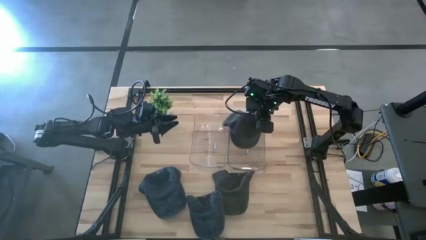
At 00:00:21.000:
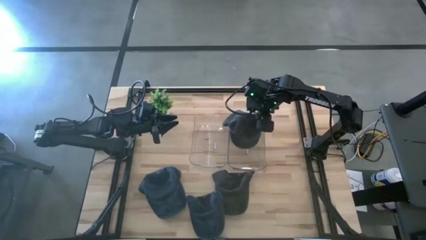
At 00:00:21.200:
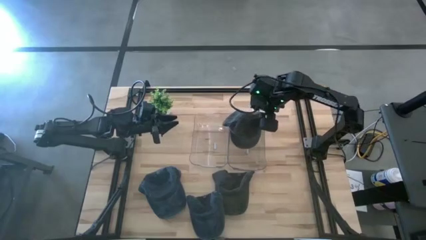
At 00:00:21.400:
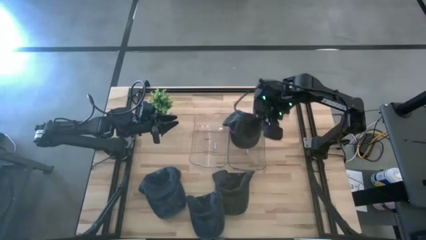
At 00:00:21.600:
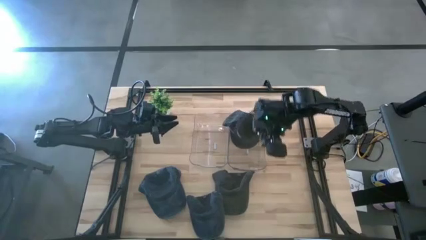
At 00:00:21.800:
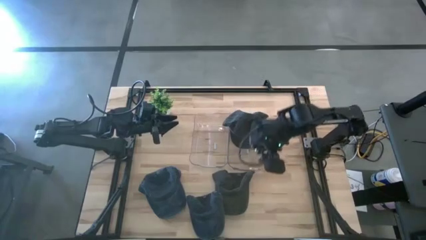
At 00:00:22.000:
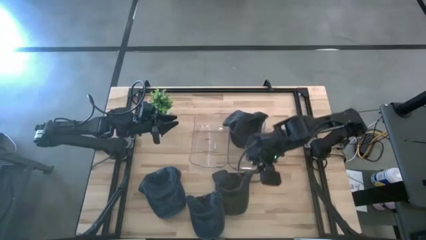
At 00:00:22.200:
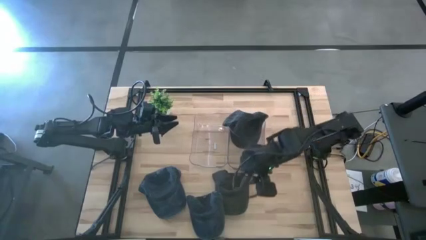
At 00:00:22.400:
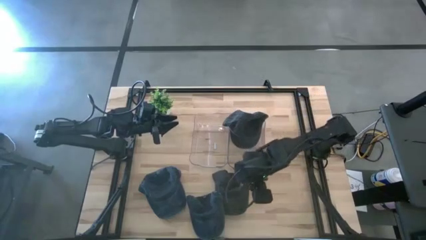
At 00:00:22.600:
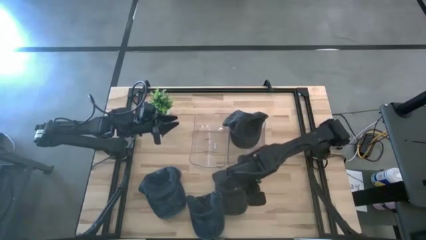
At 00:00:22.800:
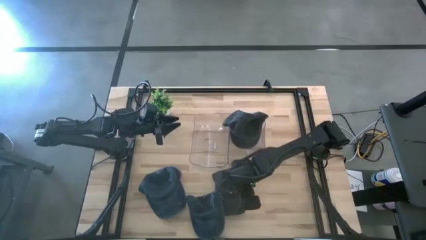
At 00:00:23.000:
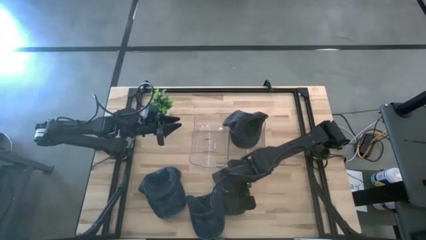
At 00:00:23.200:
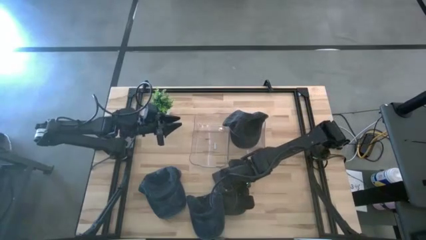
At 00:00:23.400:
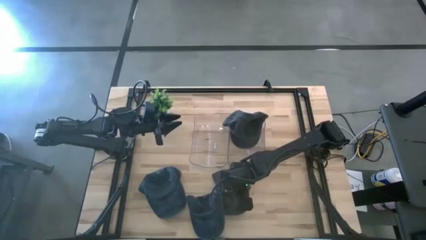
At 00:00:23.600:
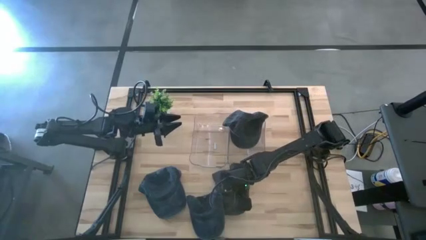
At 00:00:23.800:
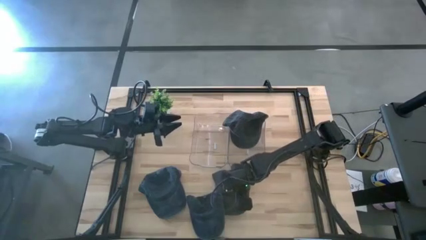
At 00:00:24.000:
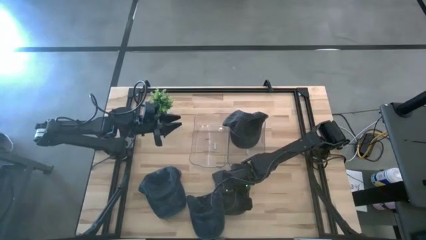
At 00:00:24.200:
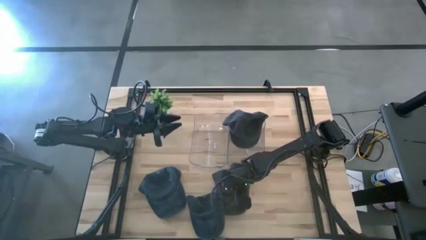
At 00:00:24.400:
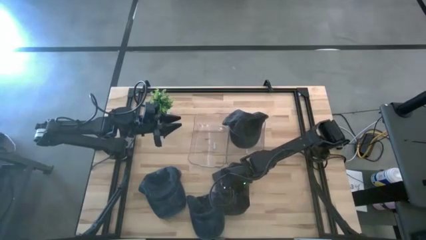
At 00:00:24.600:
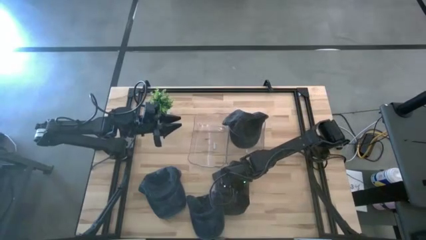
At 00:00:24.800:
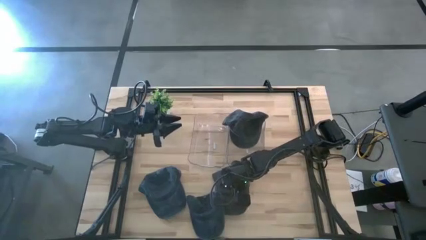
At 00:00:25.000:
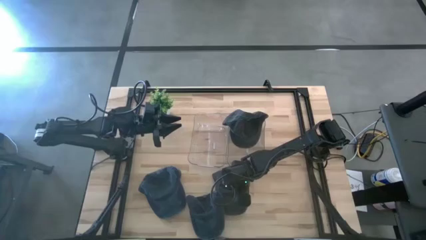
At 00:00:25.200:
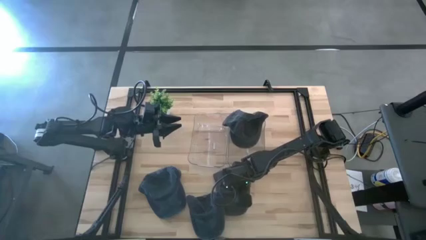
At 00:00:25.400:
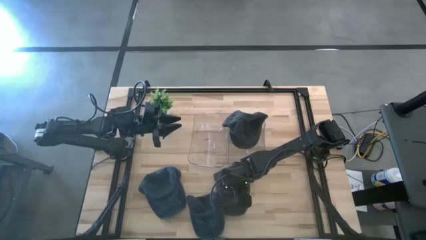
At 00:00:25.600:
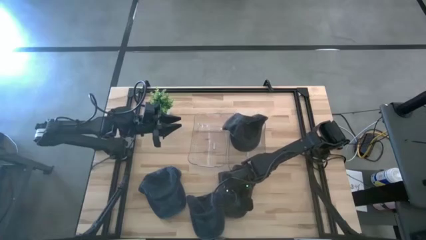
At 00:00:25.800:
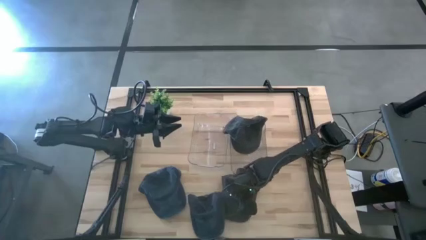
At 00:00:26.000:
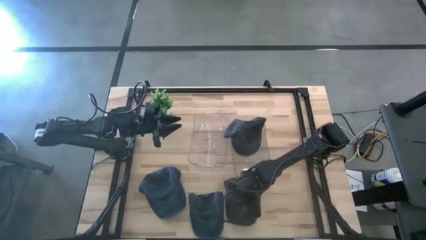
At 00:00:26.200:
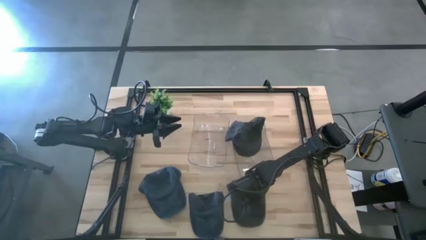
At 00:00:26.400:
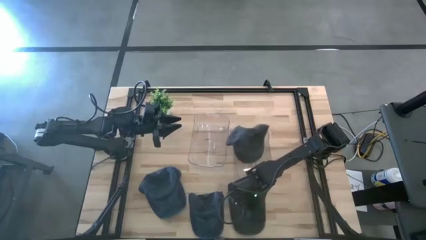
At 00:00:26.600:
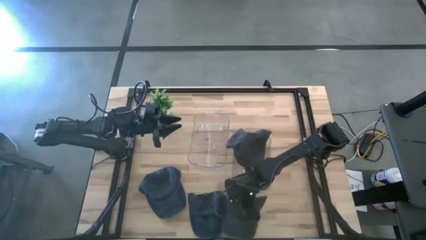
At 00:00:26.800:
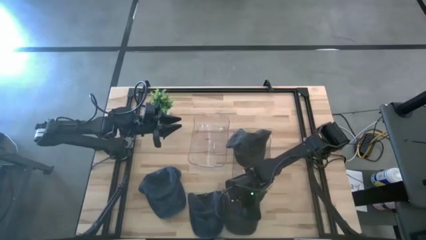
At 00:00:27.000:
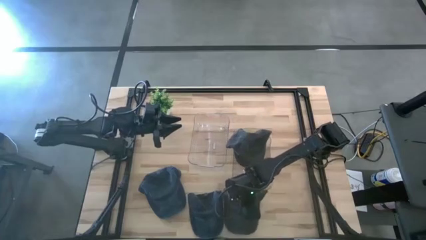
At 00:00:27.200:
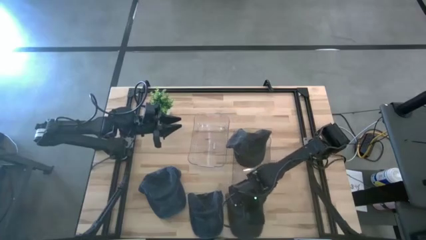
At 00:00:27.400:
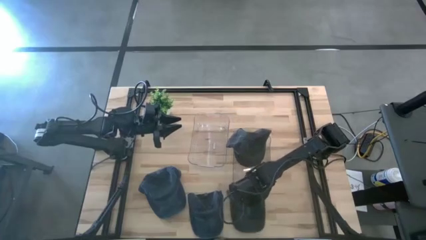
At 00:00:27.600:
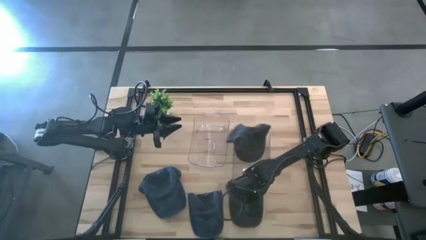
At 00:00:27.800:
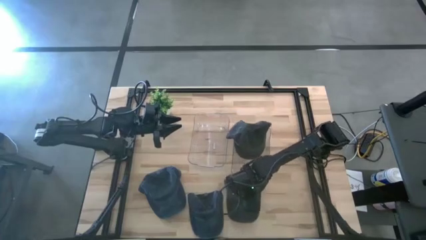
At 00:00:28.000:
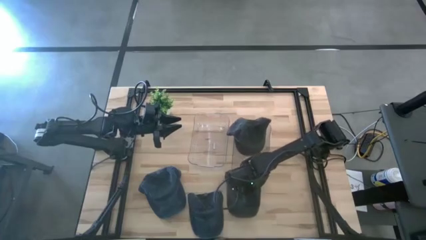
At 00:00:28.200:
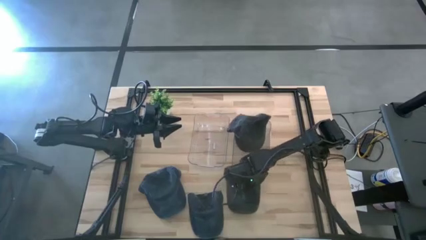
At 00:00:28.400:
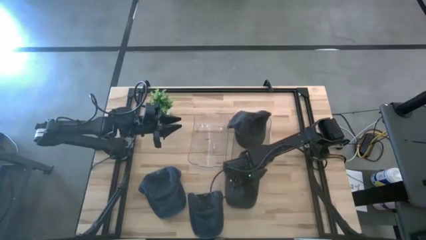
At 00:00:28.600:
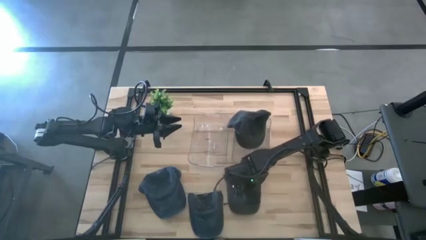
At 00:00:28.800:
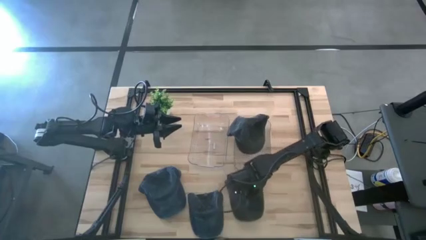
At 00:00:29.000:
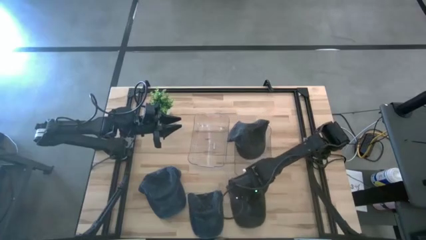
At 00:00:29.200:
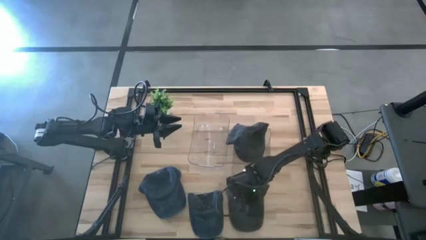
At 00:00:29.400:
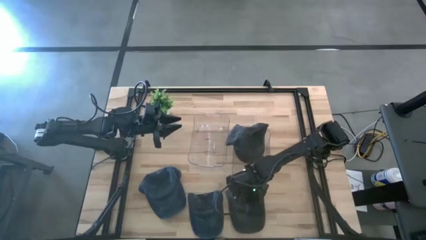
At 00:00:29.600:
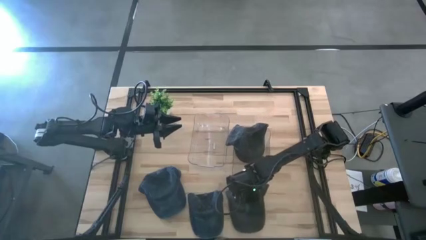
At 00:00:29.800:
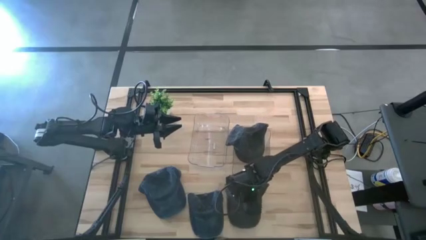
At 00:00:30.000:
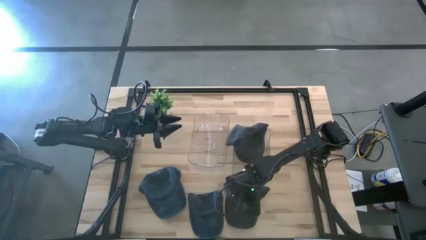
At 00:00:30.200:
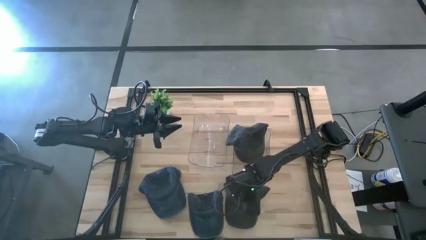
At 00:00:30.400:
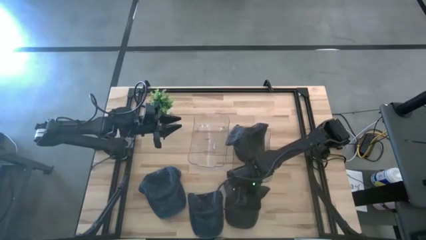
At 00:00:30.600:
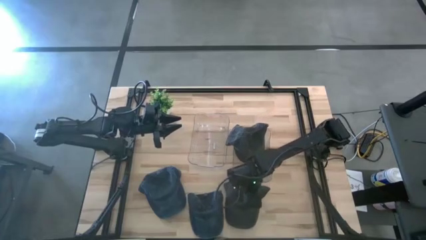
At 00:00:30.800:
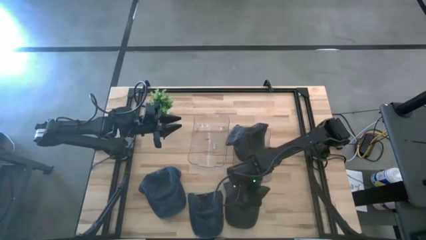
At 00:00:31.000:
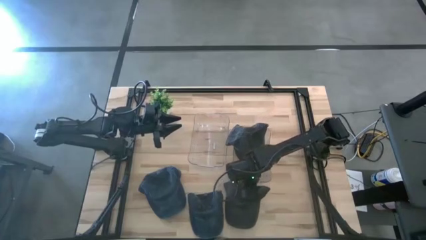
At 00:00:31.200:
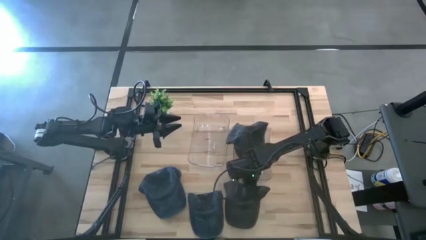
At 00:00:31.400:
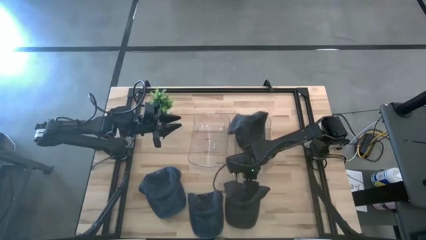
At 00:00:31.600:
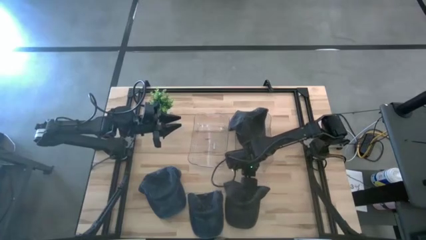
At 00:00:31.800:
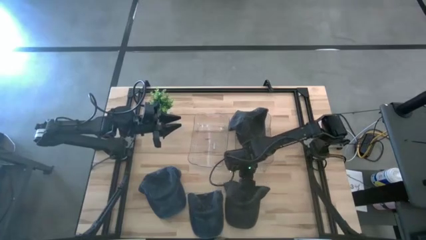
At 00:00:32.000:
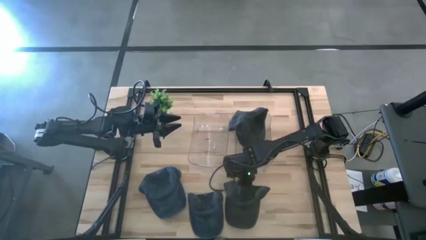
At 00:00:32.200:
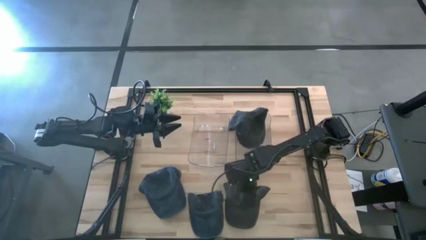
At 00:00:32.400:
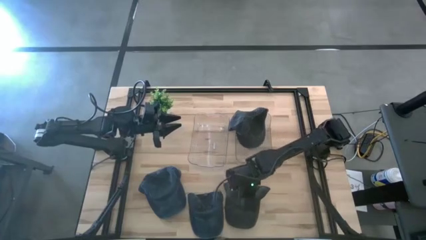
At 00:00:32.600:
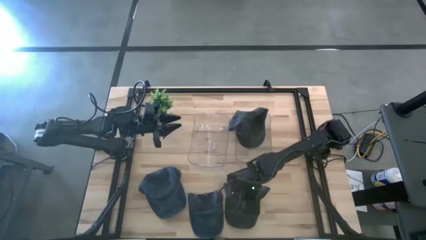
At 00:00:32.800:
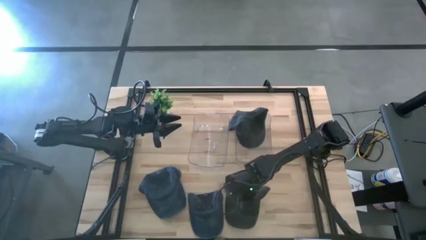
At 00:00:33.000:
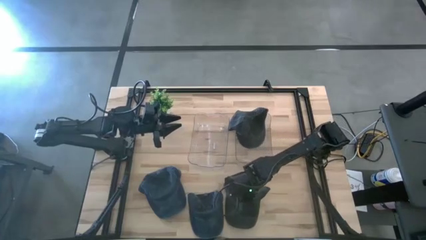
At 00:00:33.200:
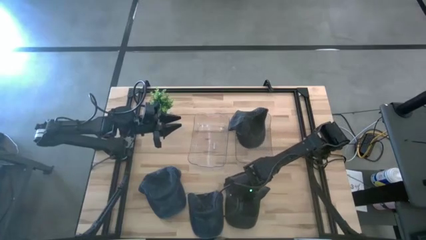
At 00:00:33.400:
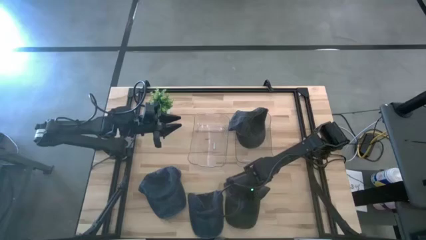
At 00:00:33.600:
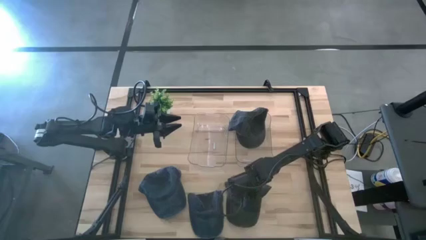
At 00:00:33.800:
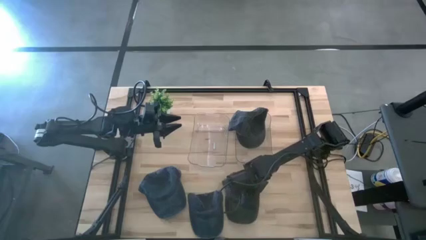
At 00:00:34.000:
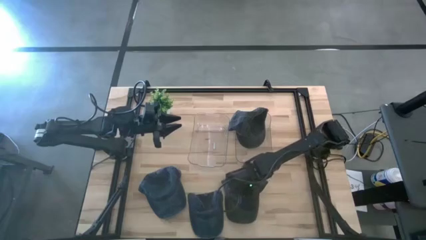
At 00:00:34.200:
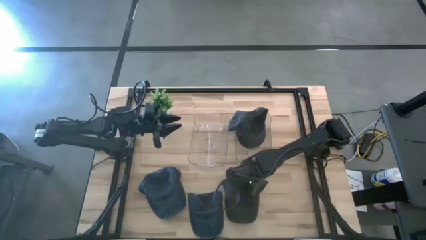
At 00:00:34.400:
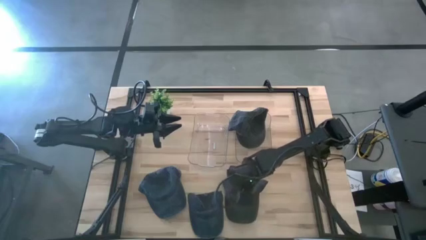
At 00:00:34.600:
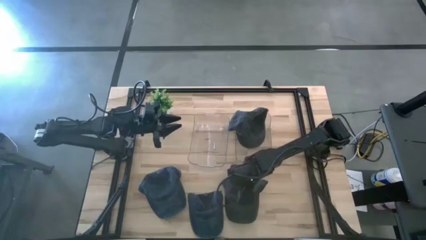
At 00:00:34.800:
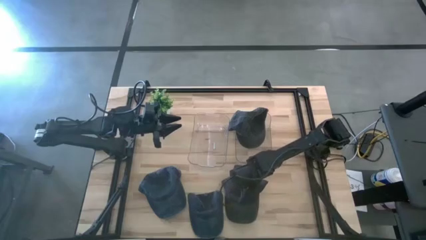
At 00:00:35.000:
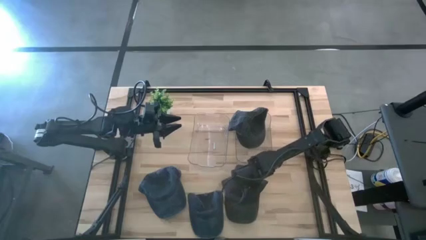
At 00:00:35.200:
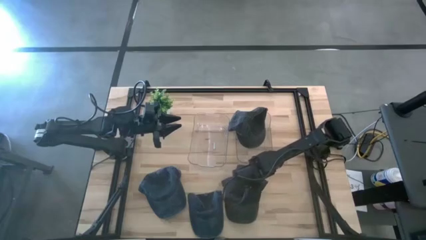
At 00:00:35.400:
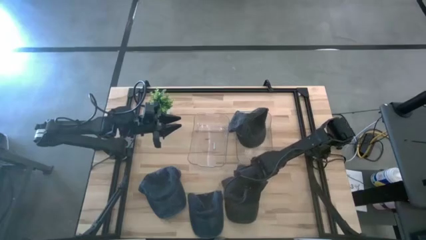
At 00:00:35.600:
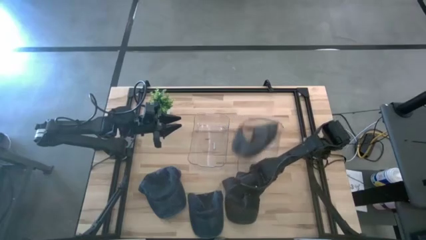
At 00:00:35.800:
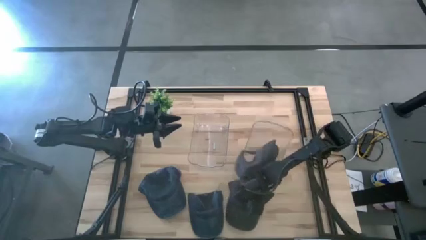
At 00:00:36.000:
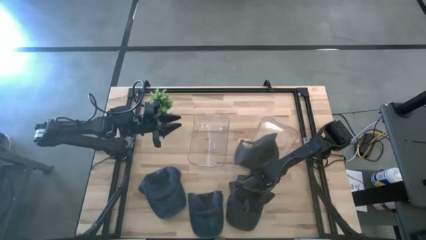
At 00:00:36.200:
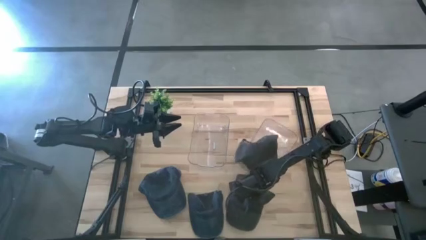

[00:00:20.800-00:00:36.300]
Task: Pick & Place hat
Put the black cap into the right transparent bin
